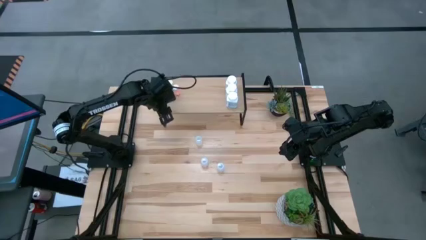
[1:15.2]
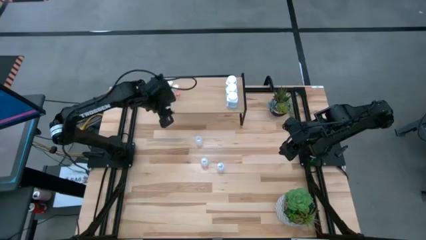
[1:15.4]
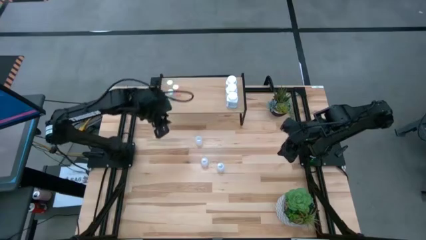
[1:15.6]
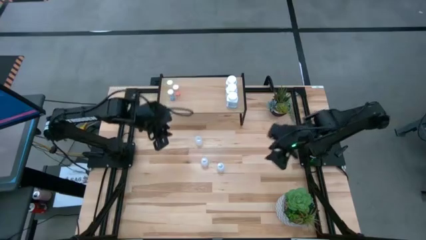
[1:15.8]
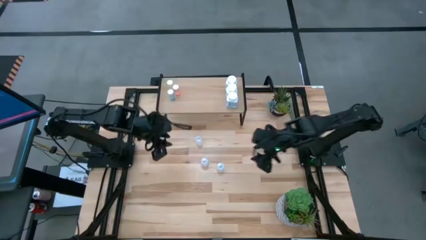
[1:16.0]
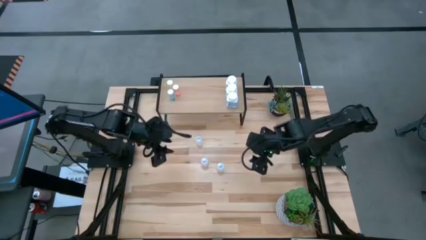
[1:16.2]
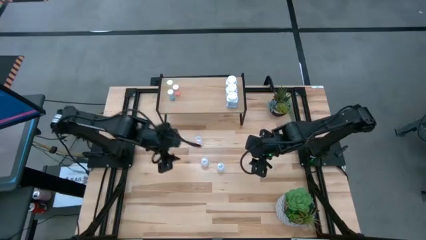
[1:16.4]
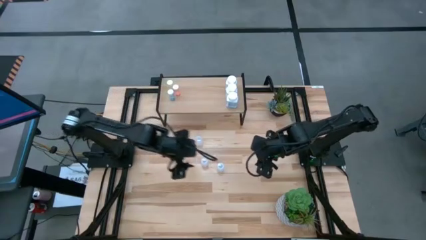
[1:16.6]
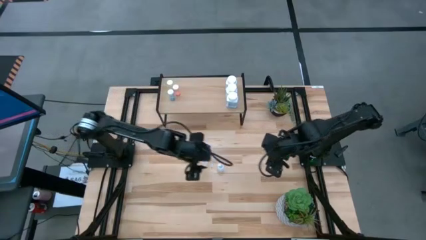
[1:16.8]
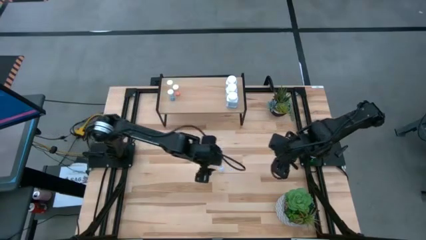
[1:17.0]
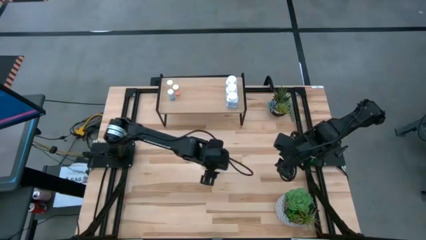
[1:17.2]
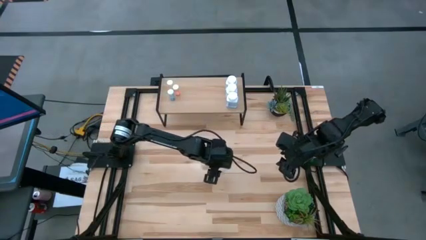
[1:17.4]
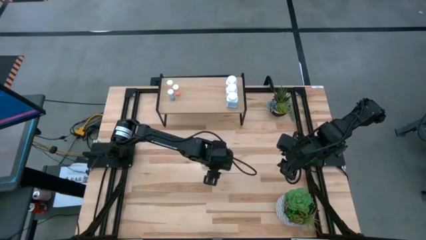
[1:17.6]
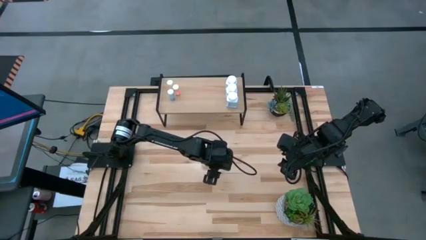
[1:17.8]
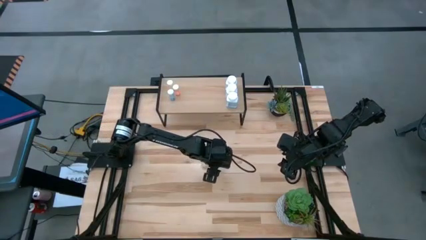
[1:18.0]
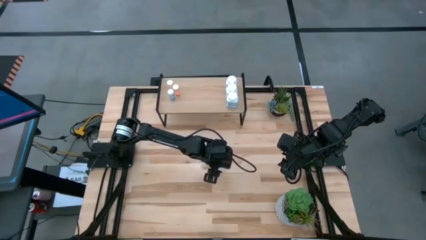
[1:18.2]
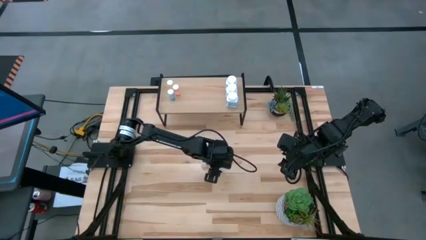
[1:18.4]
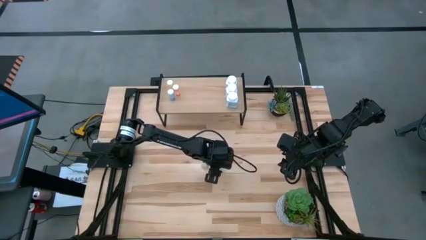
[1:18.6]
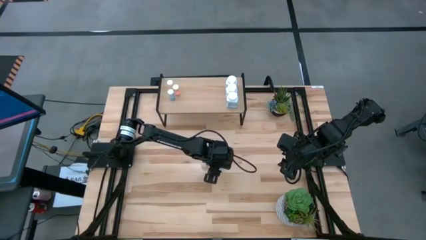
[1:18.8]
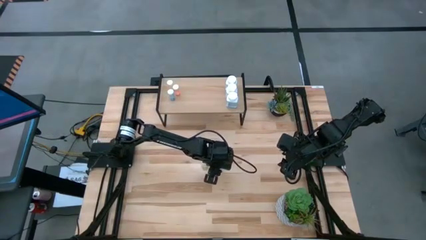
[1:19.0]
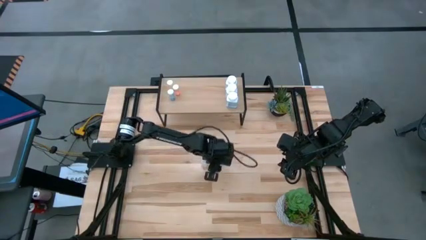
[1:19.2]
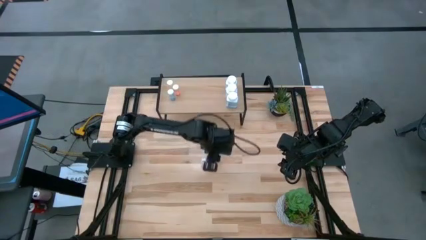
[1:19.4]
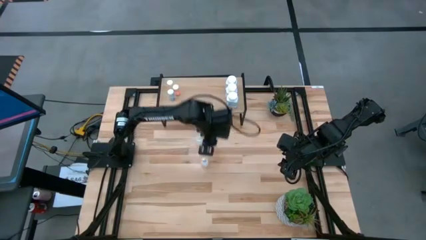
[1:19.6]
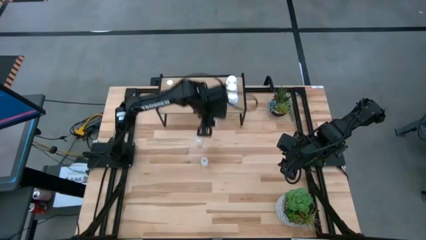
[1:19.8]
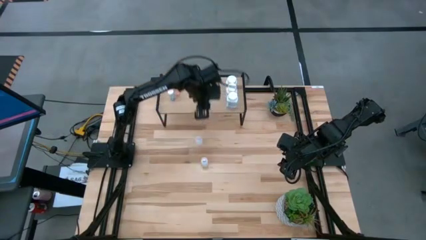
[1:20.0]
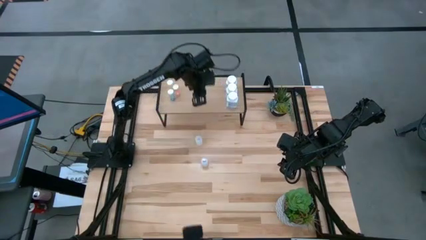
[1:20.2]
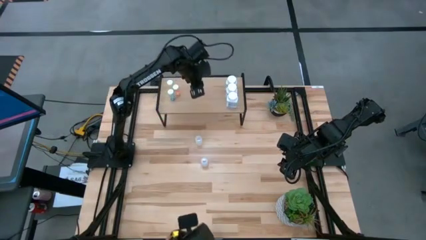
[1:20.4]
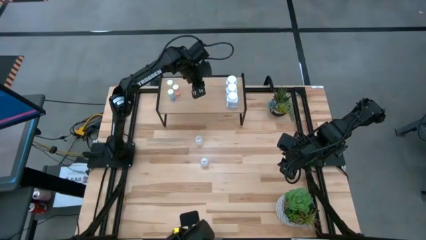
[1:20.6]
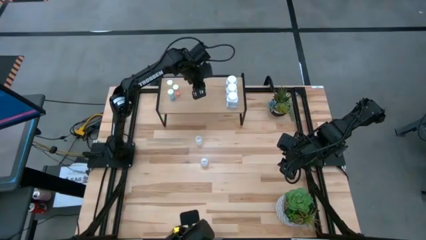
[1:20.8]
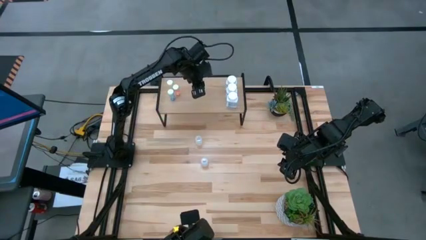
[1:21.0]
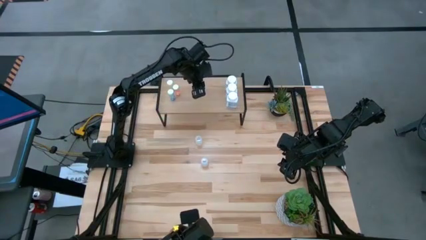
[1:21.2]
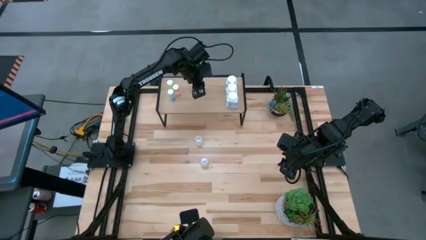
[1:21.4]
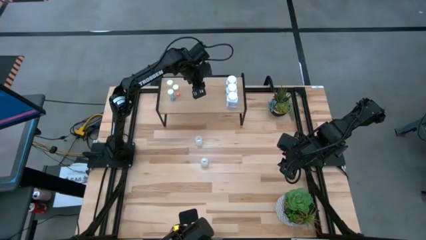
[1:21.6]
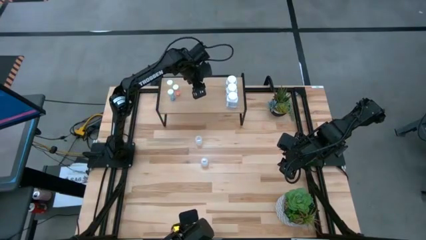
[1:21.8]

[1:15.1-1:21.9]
Task: Pick and place medicine bottles onto shelf by color
Put the bottom right small transparent pill bottle on the shelf

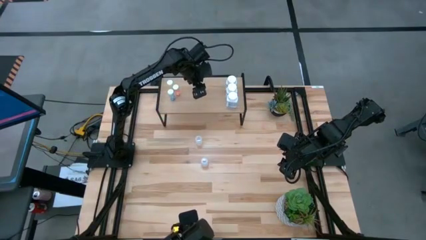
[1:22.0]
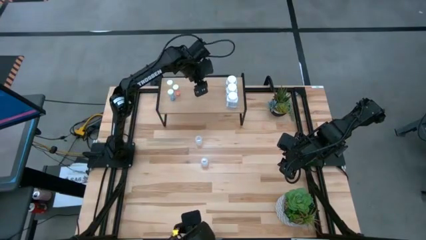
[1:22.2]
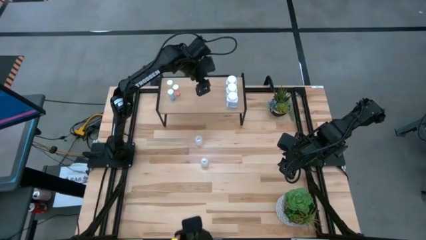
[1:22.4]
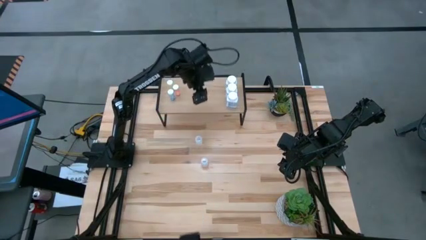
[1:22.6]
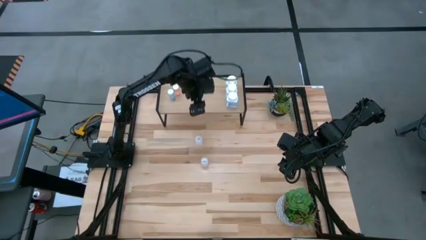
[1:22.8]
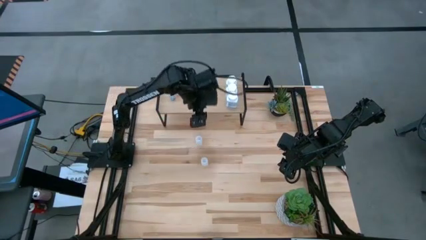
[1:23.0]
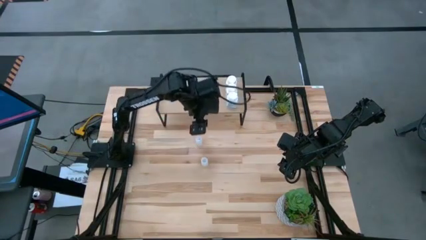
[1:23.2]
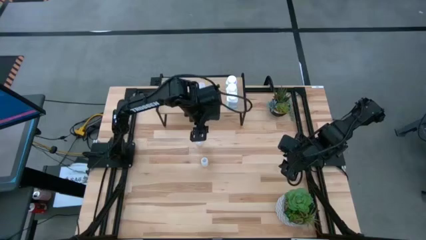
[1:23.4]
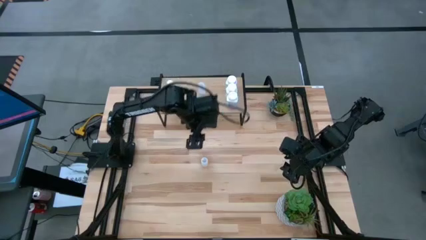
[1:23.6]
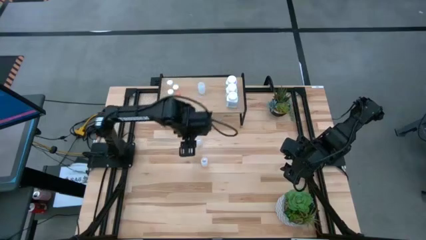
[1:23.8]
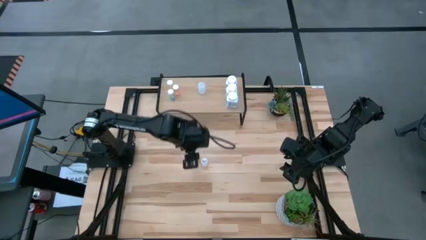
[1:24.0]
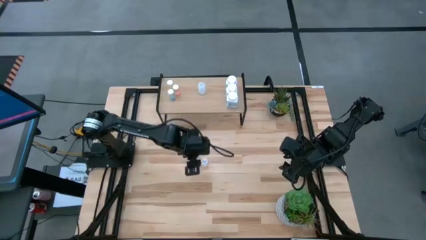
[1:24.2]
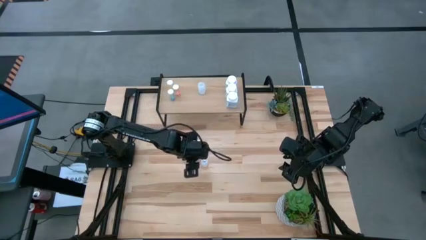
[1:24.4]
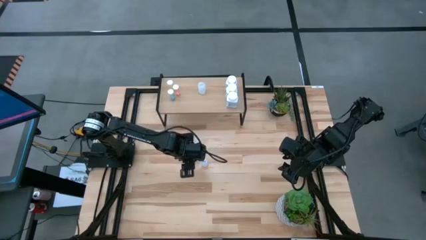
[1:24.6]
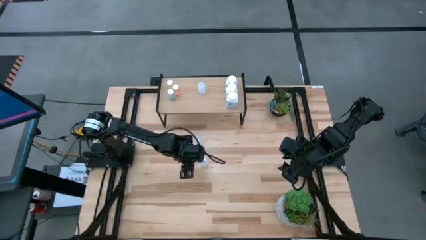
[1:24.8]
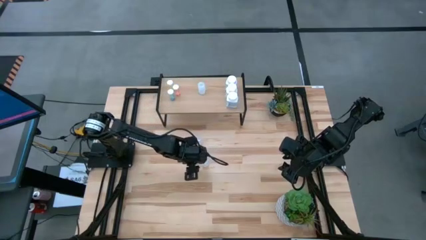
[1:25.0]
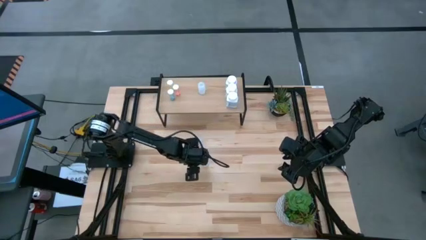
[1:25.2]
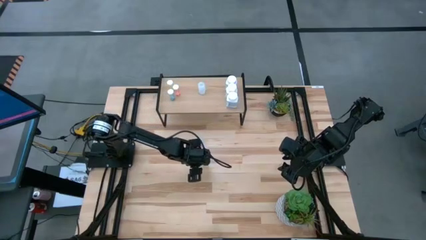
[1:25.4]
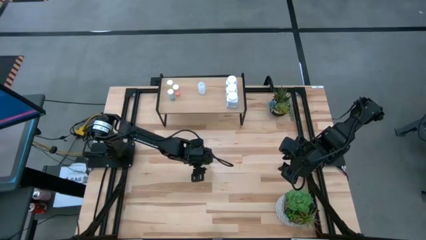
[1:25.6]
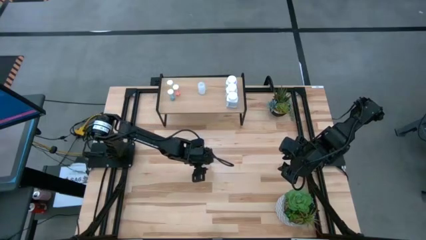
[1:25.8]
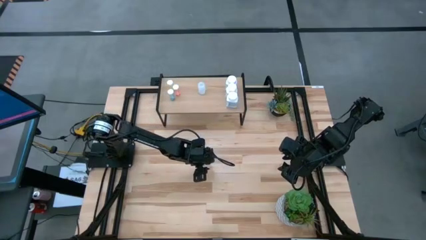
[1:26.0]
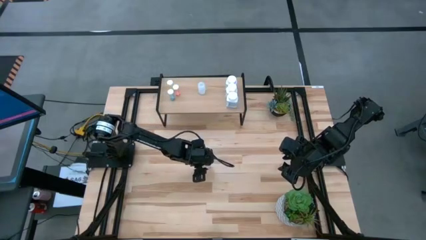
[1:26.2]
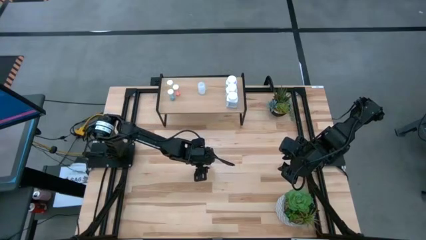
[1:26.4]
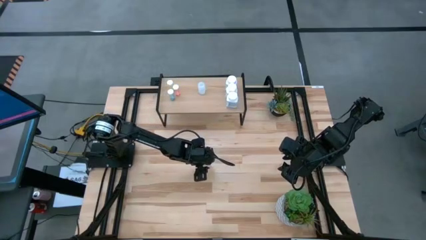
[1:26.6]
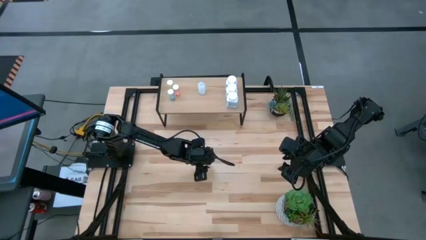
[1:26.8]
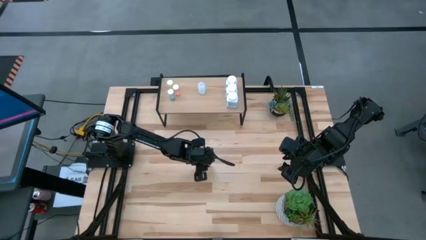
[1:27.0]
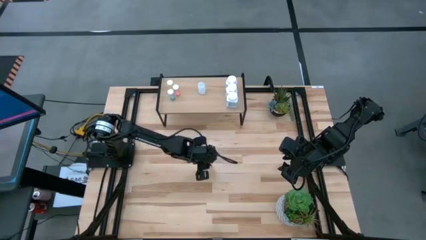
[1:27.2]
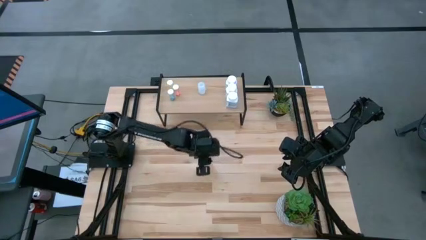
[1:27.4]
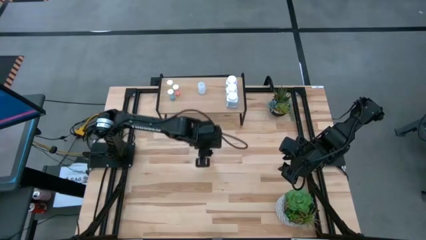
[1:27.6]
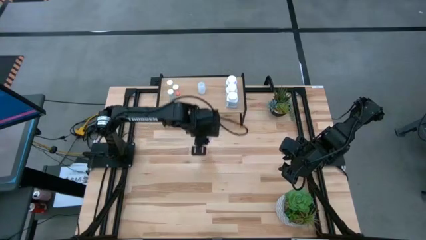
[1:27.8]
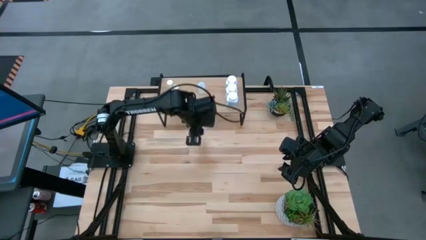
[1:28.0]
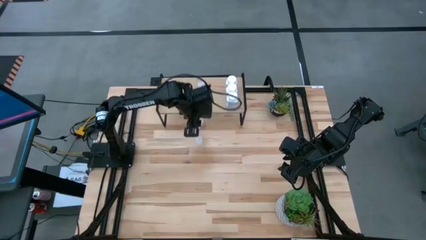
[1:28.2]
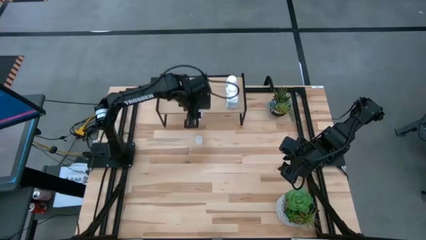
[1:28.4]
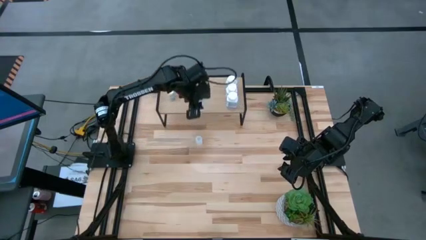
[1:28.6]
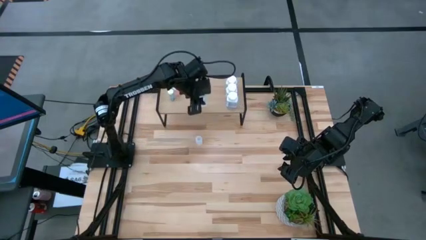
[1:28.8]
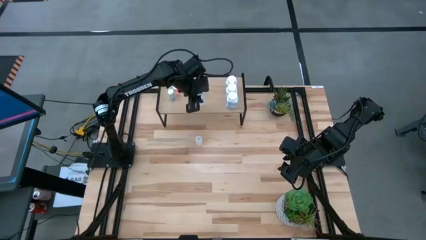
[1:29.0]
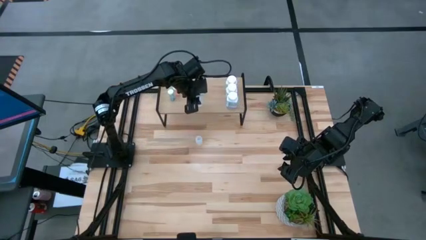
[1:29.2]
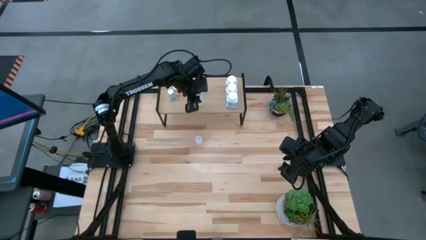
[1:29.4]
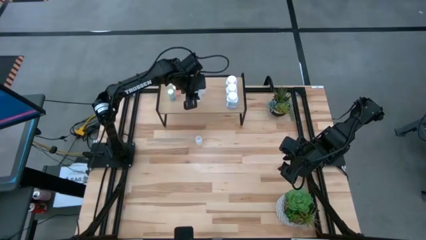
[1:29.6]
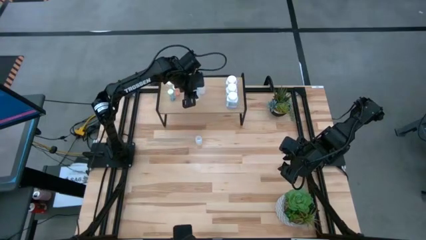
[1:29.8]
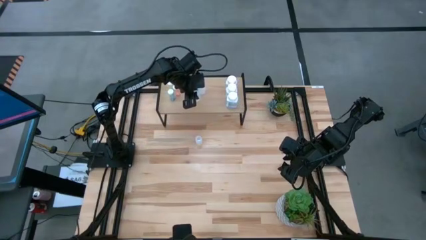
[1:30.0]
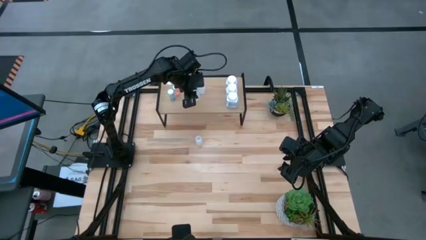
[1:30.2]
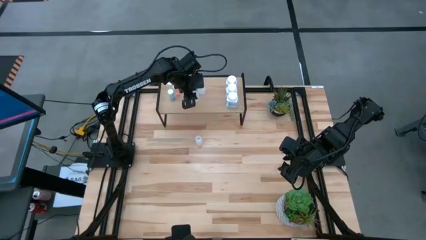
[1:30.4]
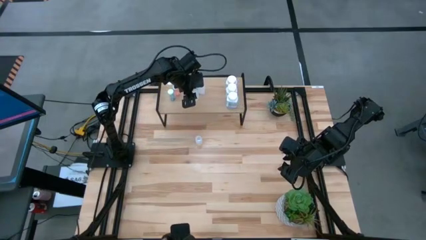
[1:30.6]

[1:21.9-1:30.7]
Put the bottom small transparent pill bottle on the shelf aligned with the other small transparent pill bottle
